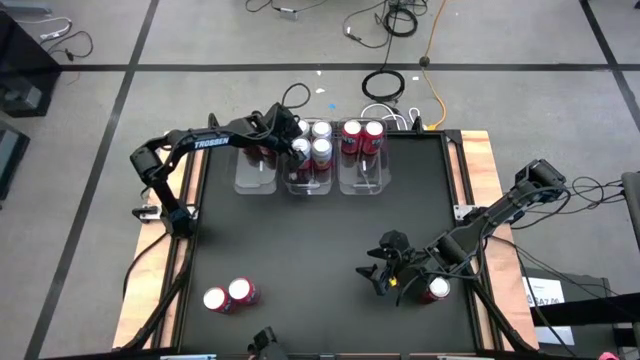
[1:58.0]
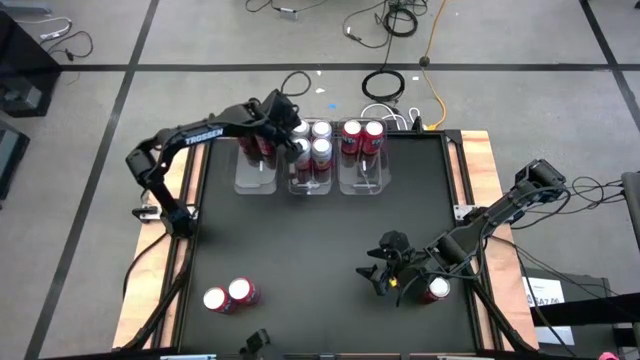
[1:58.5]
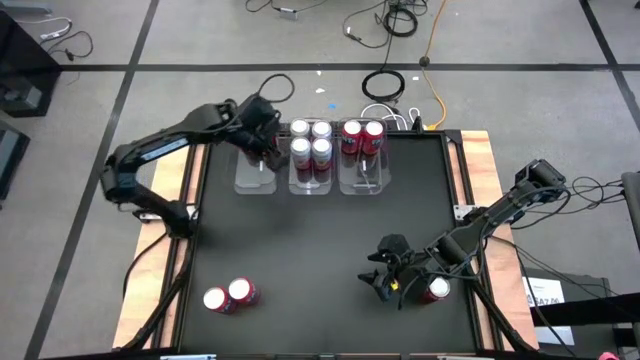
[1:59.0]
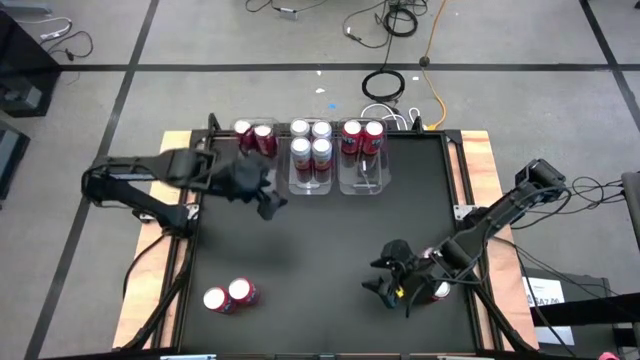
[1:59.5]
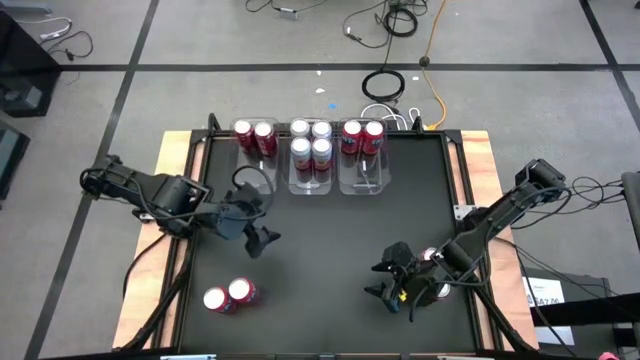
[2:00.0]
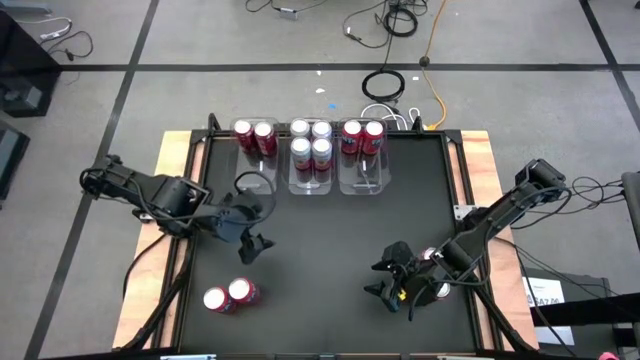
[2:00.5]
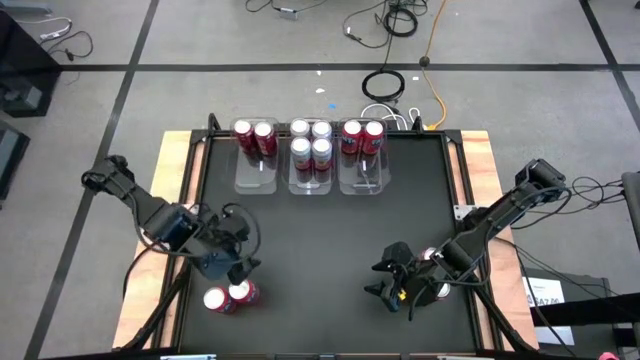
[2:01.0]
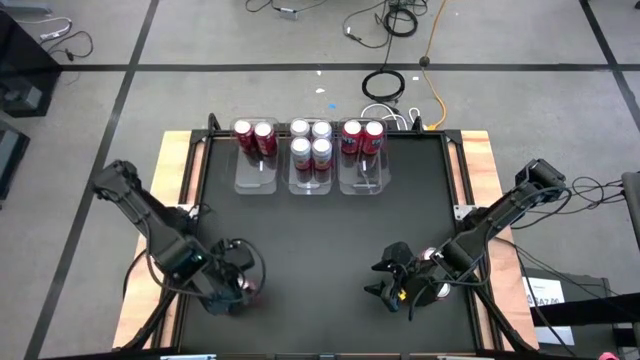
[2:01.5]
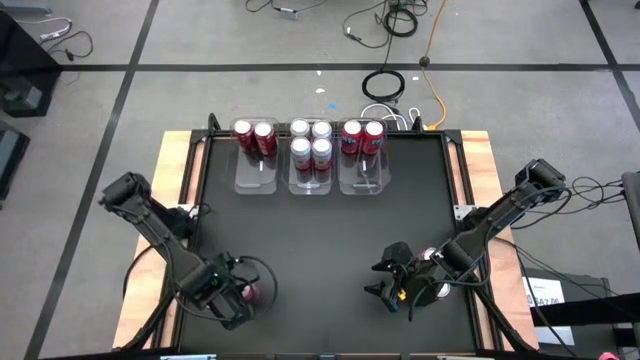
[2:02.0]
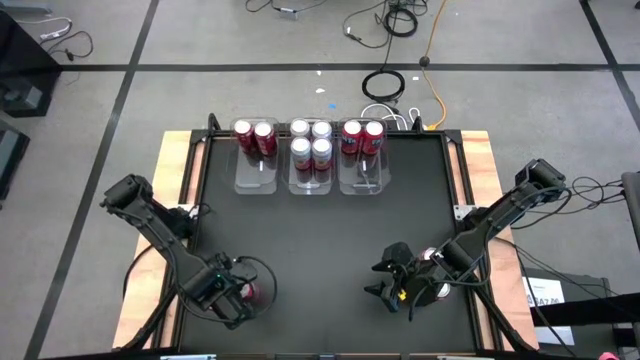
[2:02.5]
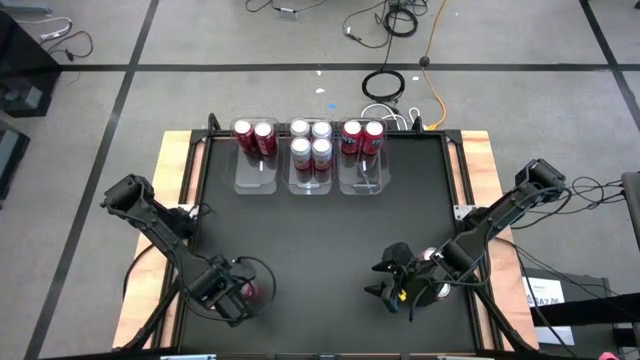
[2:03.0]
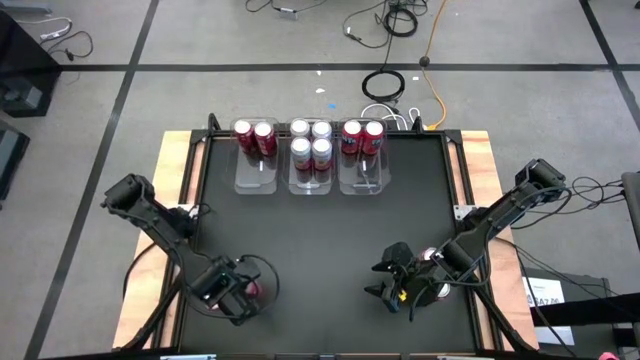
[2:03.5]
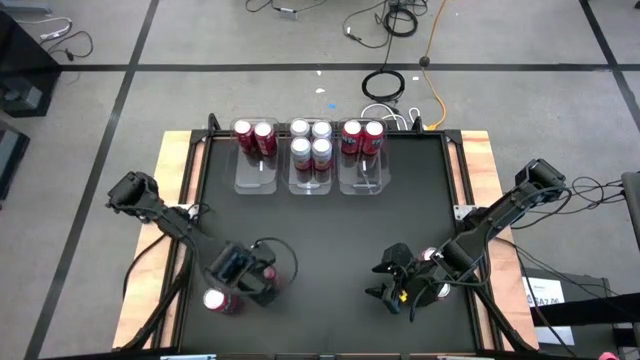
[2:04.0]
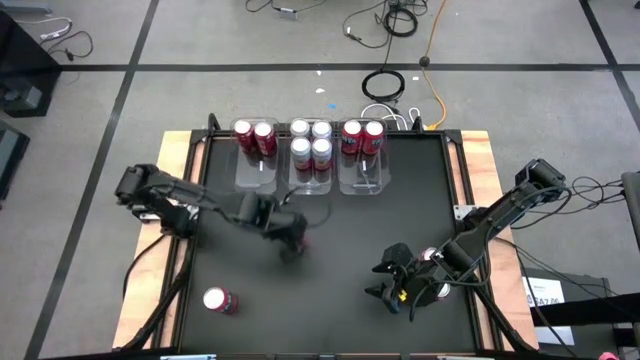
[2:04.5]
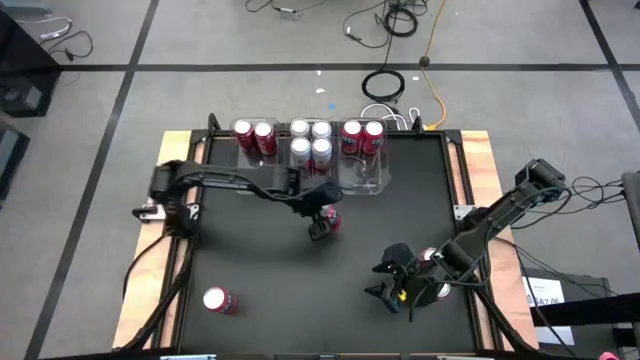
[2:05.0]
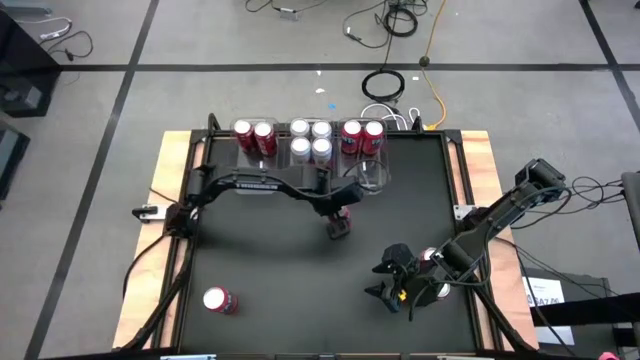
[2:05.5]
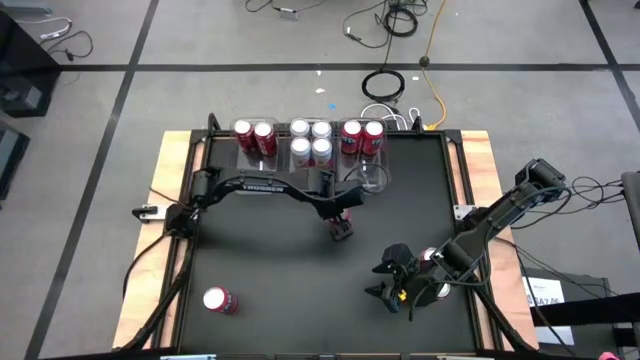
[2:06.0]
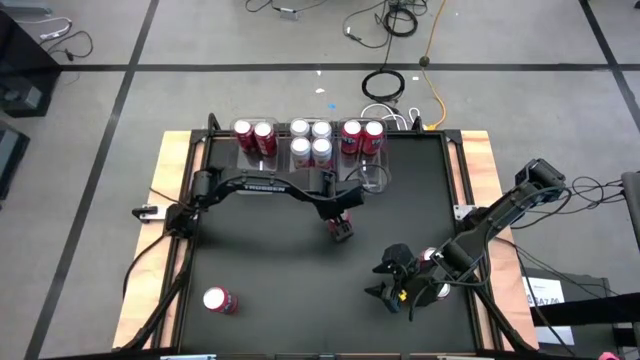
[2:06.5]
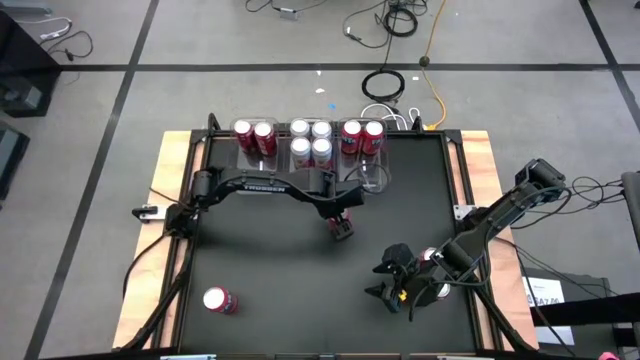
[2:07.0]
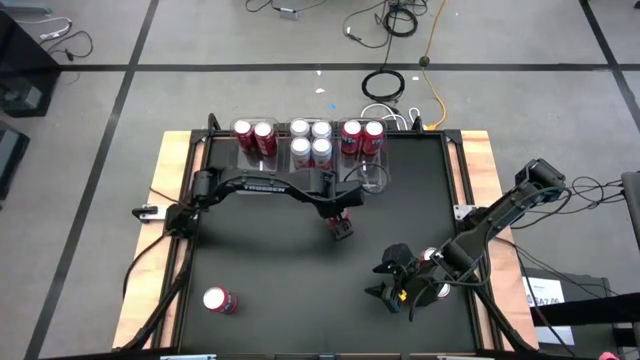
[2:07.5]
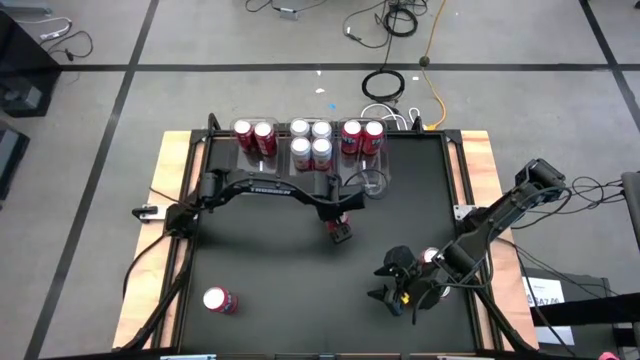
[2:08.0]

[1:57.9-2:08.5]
Task: Sort soda cans
Move the right orange soda can to the center of the table

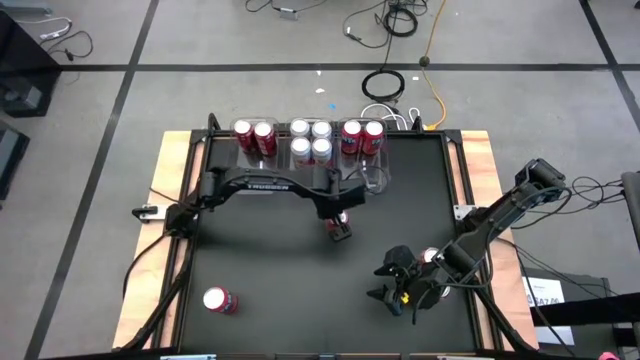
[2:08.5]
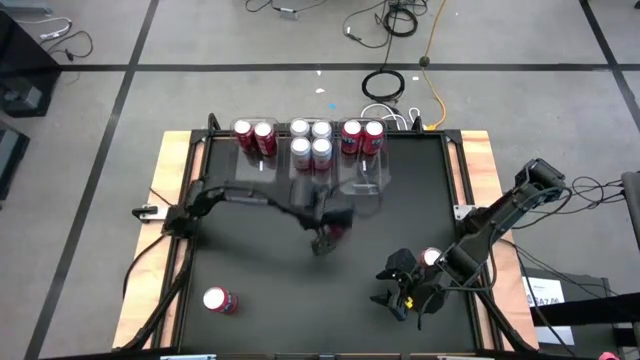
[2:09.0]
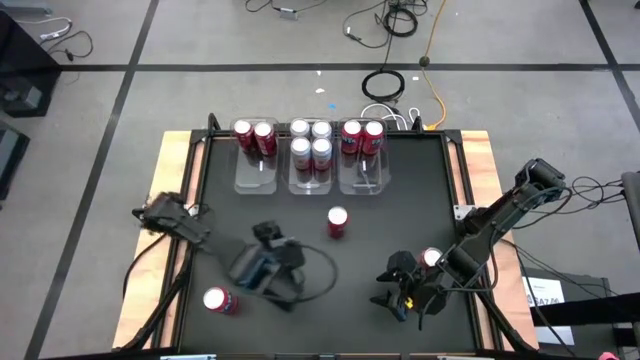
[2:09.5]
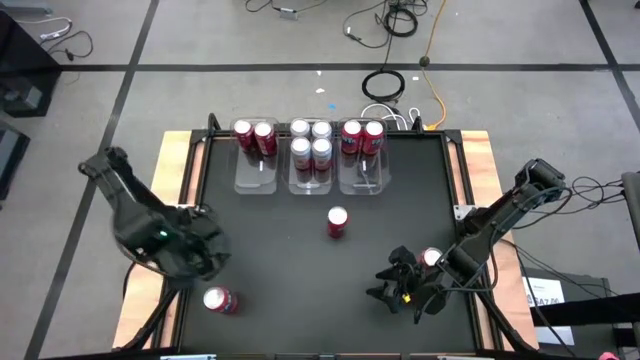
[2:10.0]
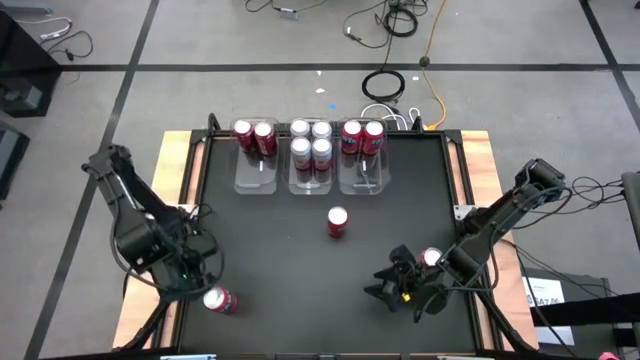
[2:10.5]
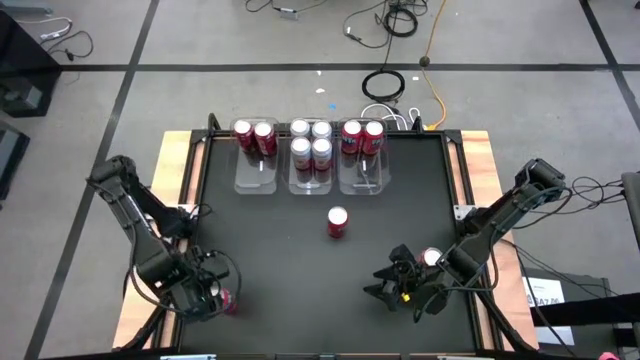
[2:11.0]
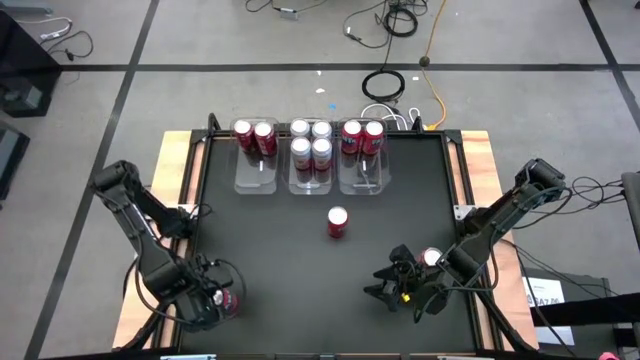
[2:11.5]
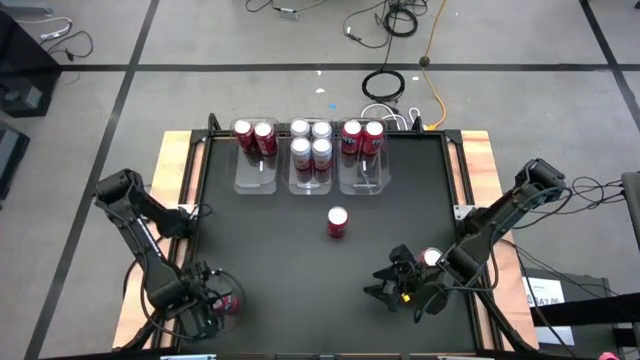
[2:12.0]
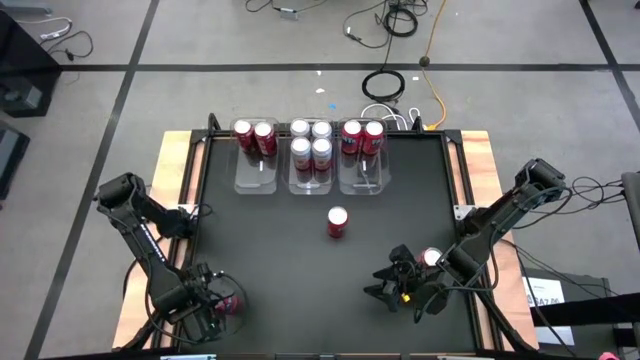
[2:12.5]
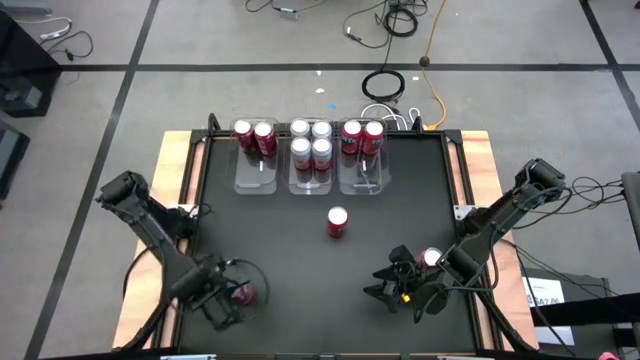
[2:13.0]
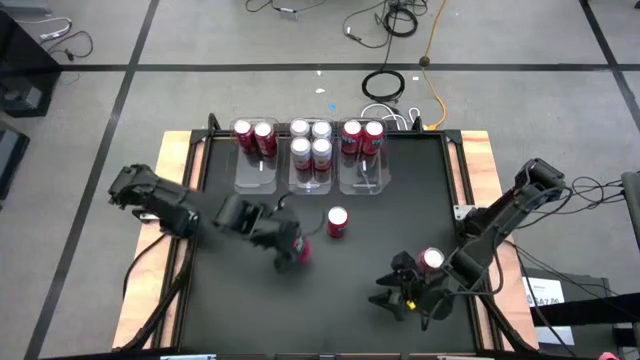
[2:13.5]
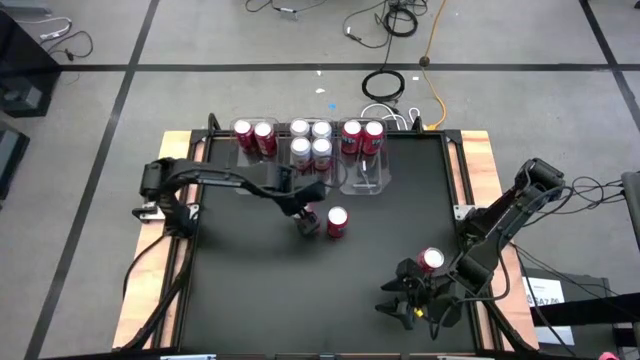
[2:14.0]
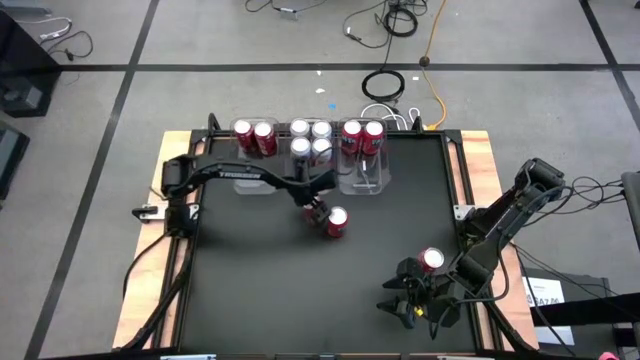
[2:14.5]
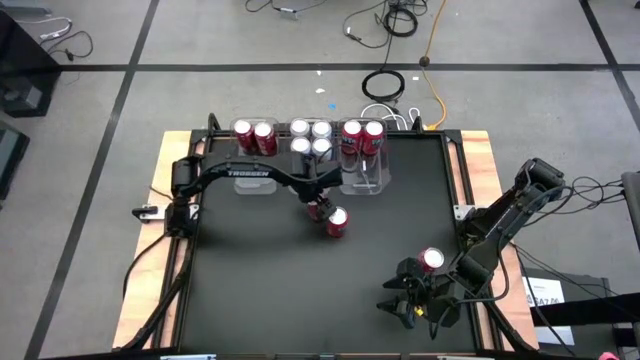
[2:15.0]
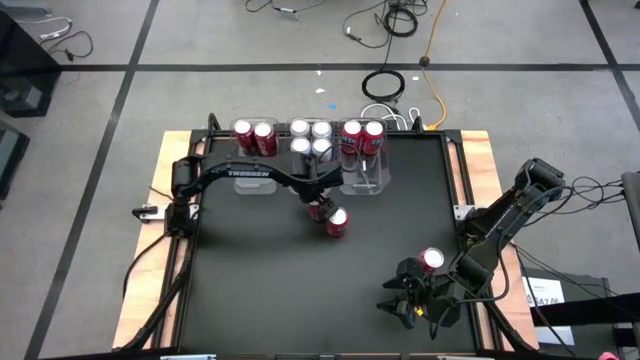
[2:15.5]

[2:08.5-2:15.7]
Move the left orange soda can to the center of the table

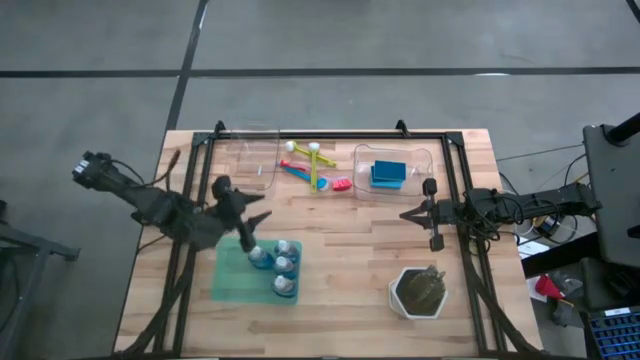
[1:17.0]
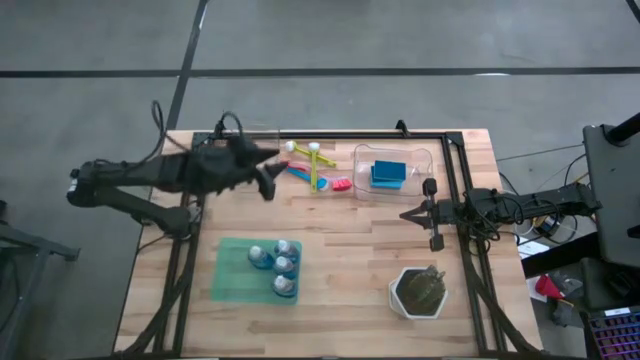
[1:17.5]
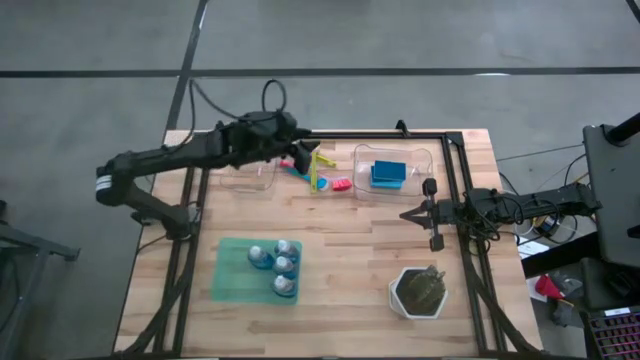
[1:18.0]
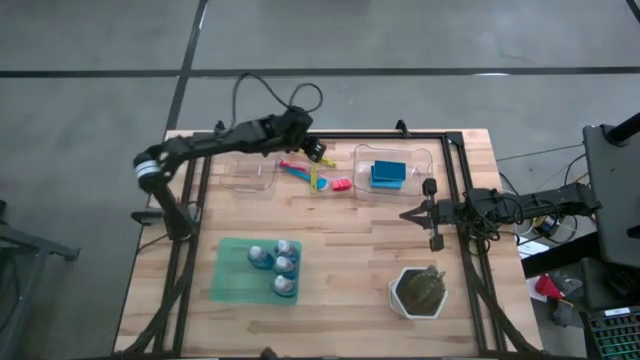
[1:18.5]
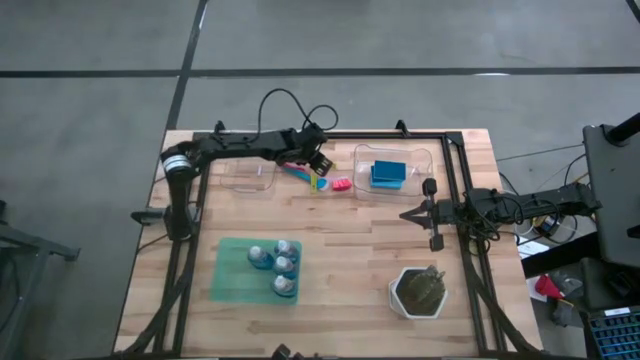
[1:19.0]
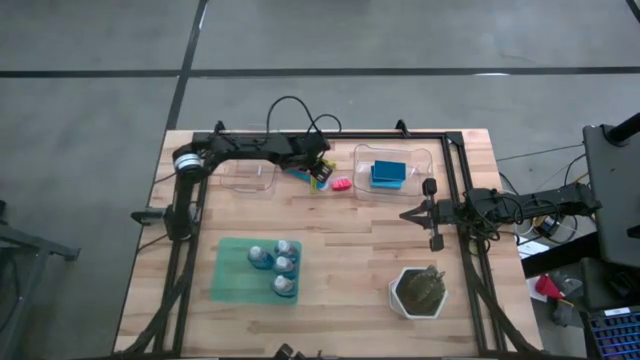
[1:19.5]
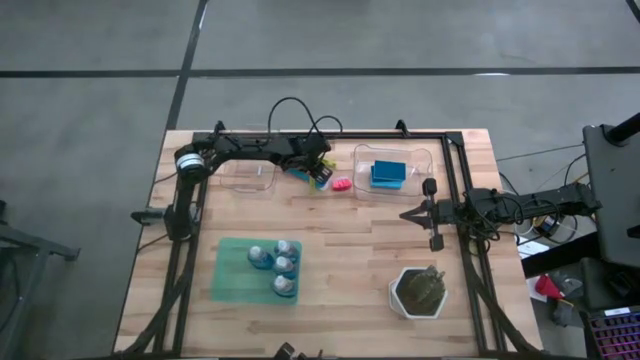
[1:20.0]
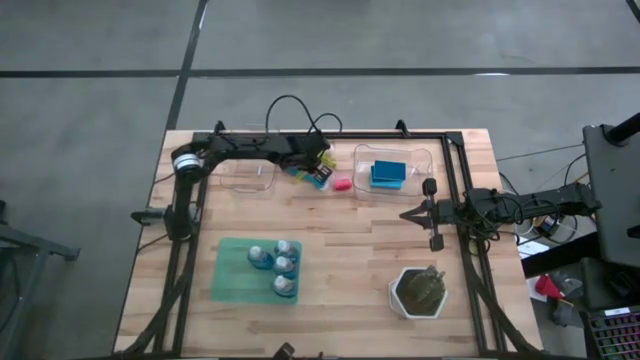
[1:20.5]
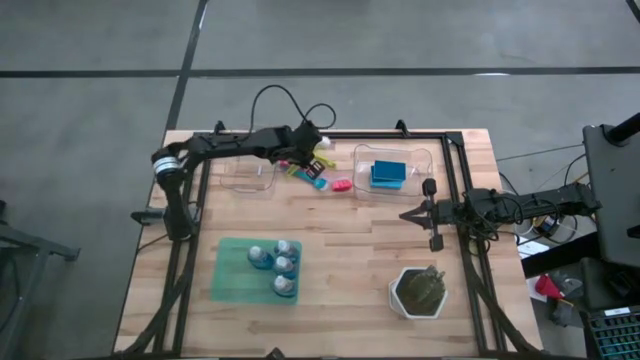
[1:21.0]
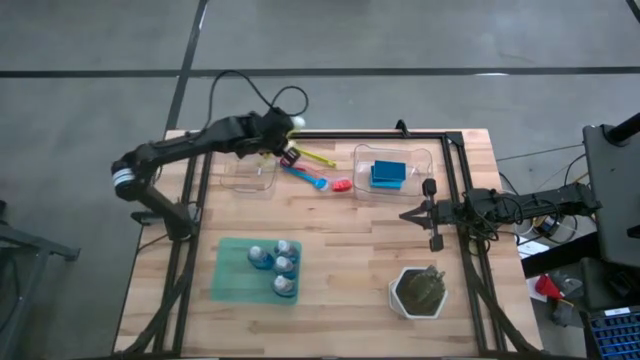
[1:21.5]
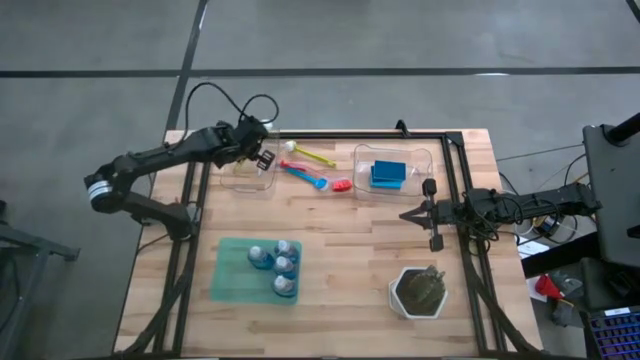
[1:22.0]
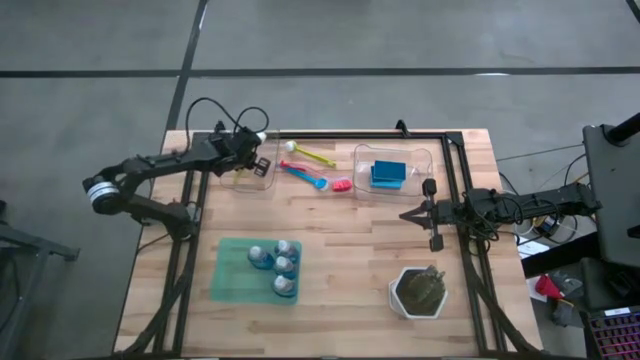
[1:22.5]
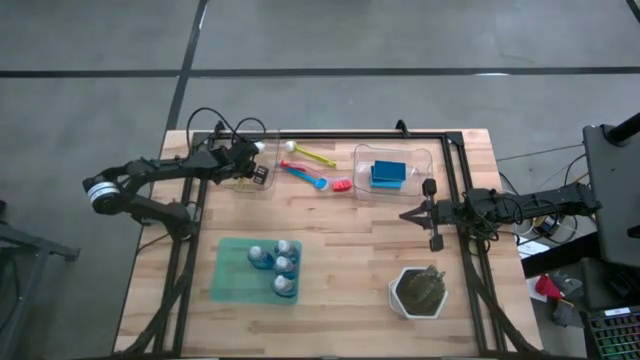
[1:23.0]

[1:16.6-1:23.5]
Task: Pick & Place Kitchen Sink Supplies
Put the green dishwashing brush into the left transparent bin
